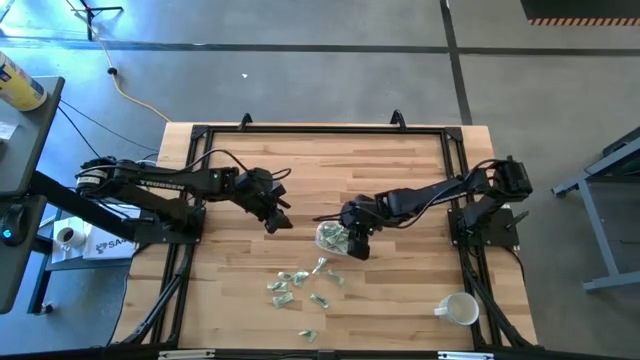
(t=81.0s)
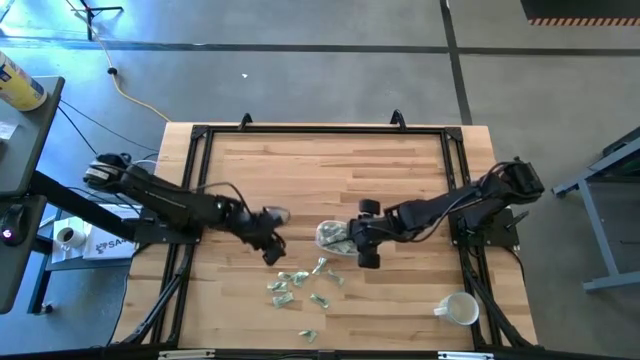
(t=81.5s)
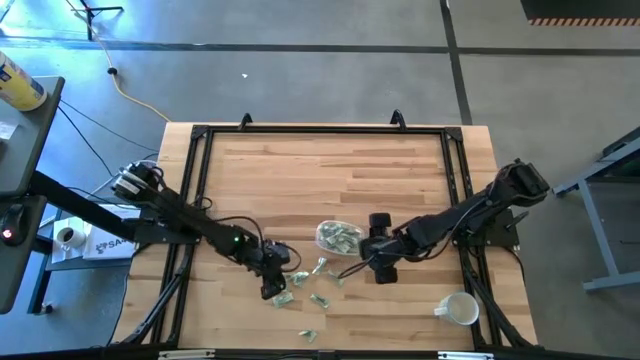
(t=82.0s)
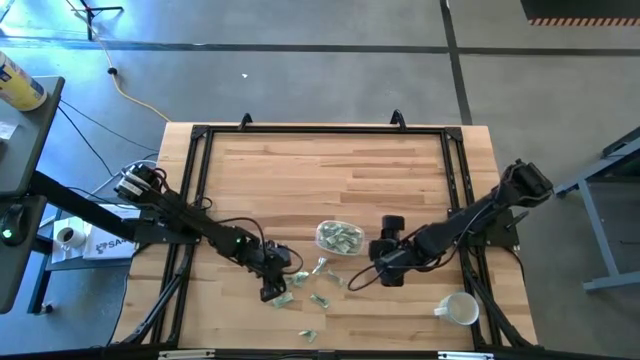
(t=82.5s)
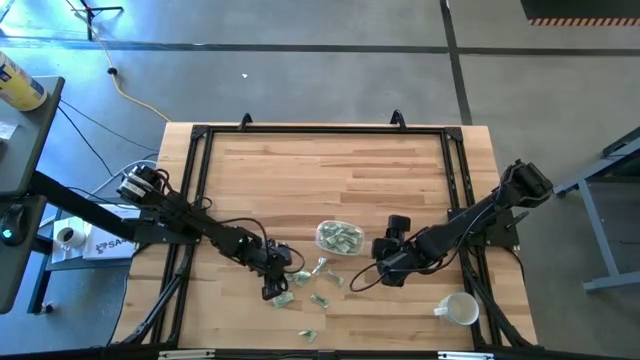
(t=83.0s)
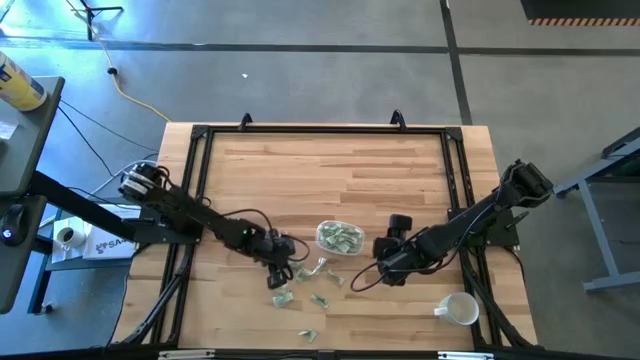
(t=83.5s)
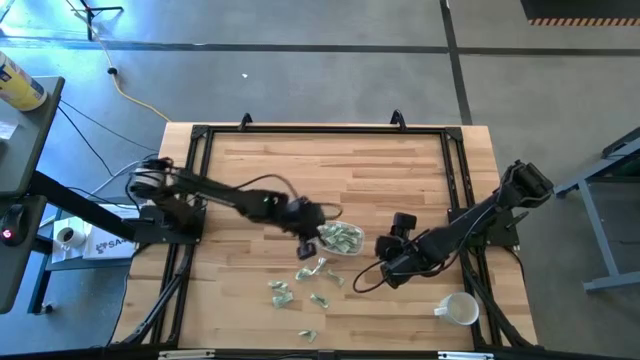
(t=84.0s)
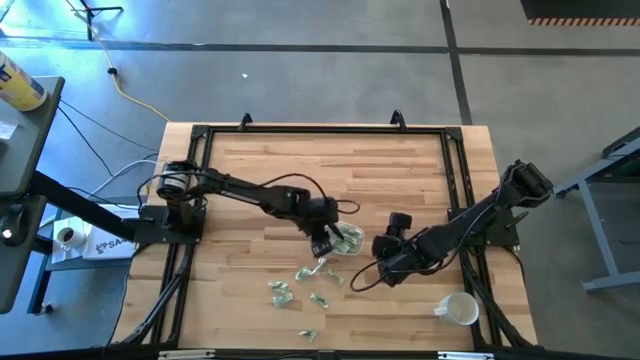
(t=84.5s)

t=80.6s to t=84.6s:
Task: Pick and place Stevia / Truvia into bins
Put the green stevia packet into the transparent container

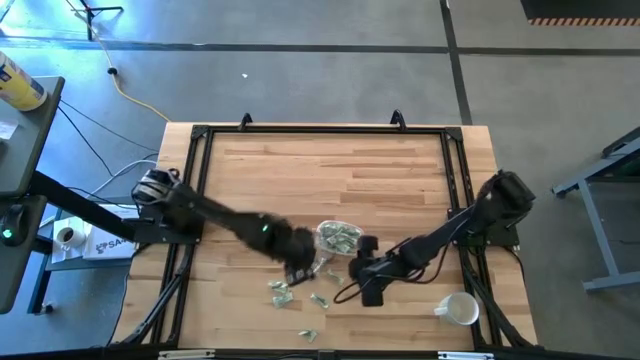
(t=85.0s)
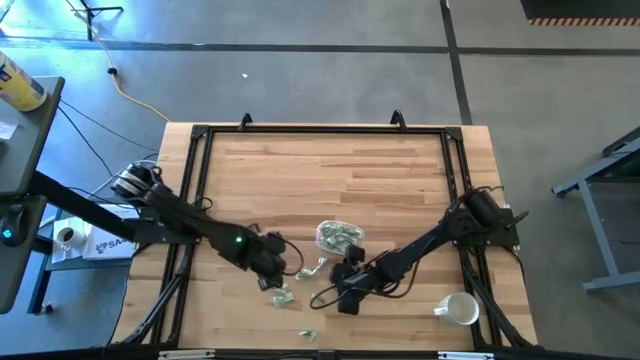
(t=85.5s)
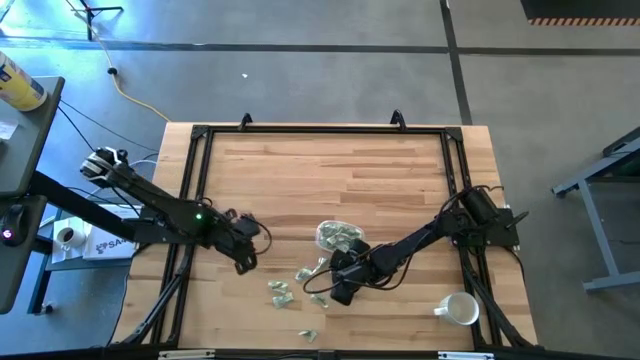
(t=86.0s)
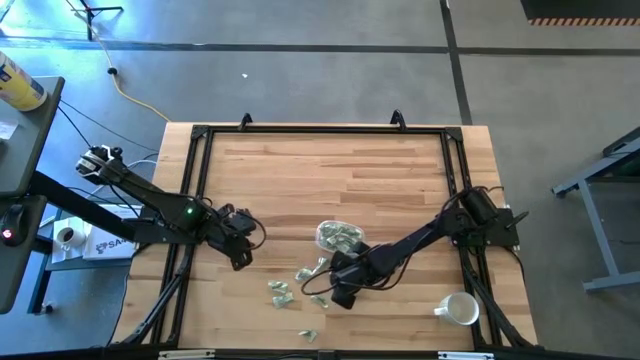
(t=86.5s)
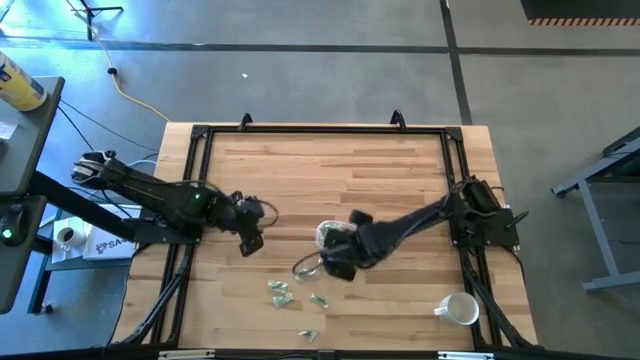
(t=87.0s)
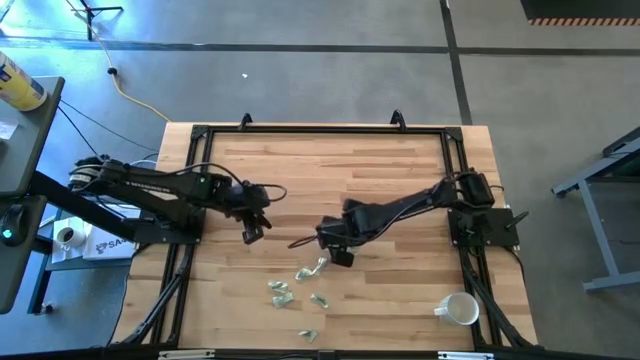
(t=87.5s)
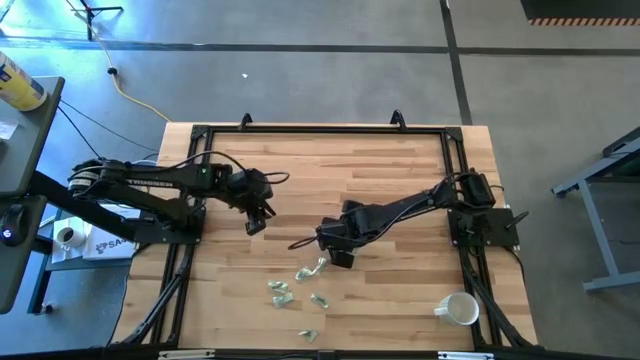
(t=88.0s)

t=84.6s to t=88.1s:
Put the green stevia packet into the transparent container

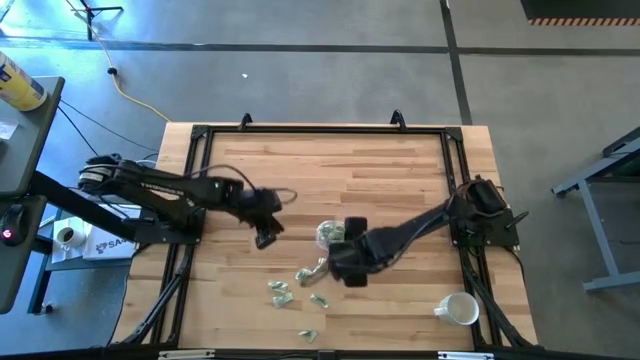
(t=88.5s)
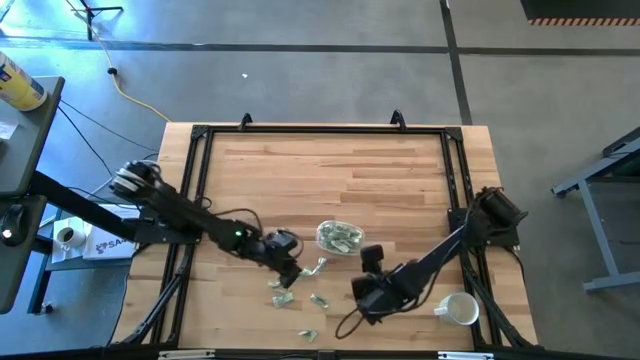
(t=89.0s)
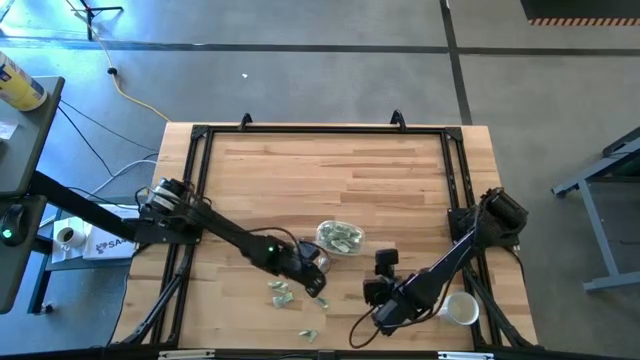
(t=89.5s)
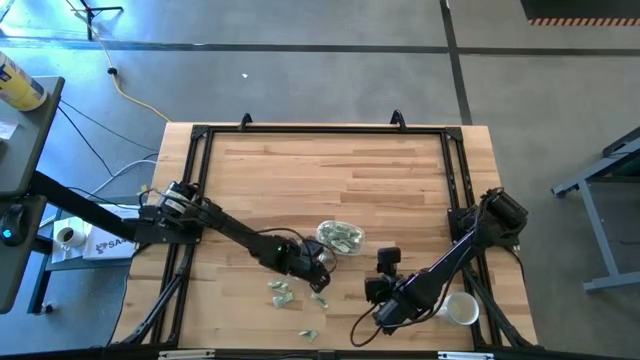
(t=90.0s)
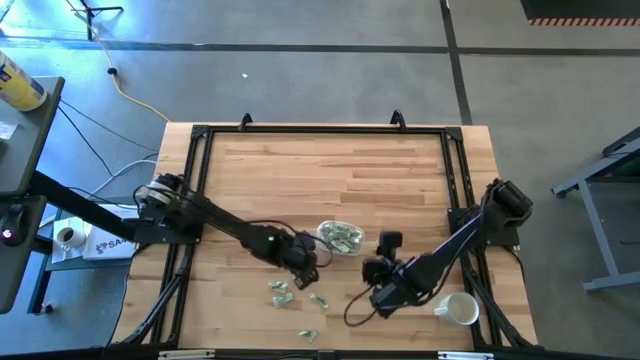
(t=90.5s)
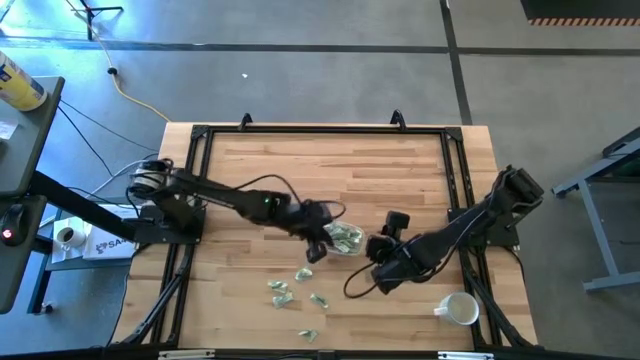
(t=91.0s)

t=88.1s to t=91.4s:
Put the green stevia packet into the transparent container

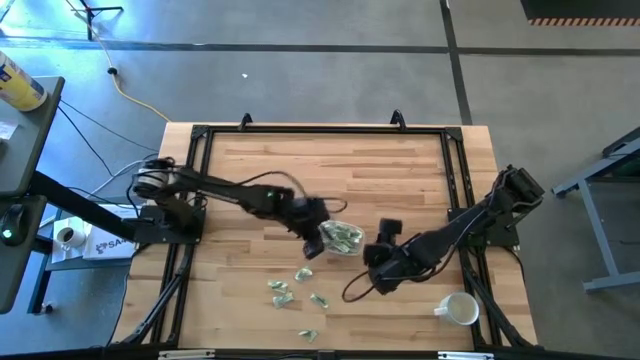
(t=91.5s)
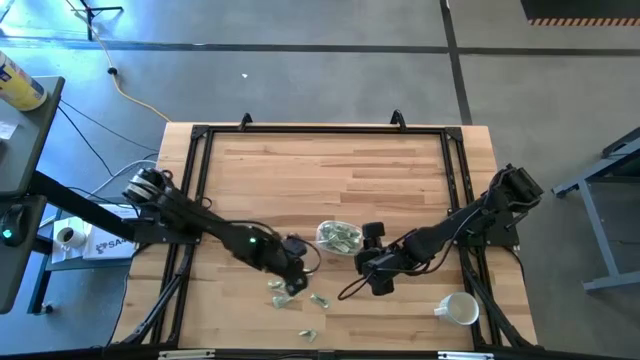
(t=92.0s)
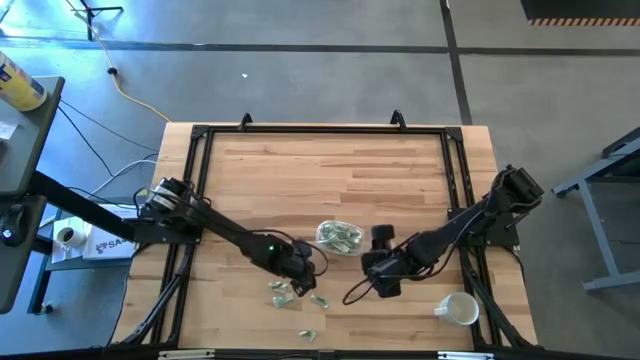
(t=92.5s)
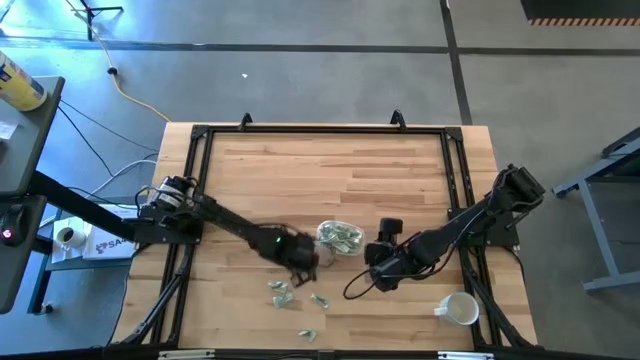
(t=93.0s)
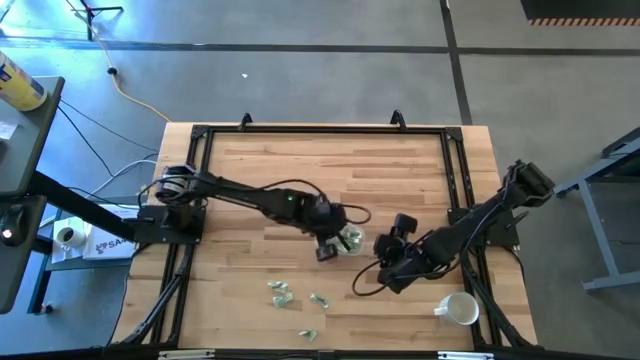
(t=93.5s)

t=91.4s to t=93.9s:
Put the green stevia packet into the transparent container

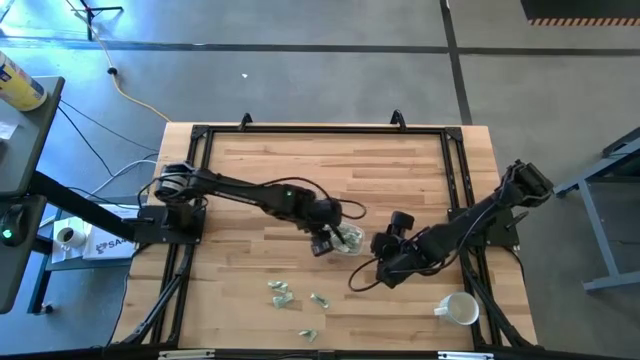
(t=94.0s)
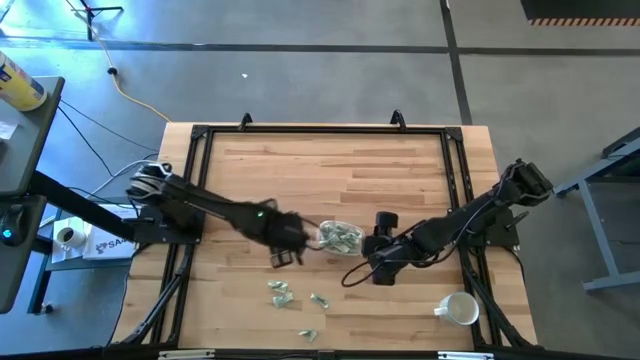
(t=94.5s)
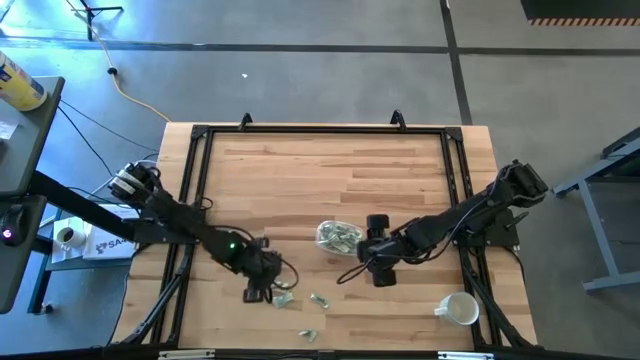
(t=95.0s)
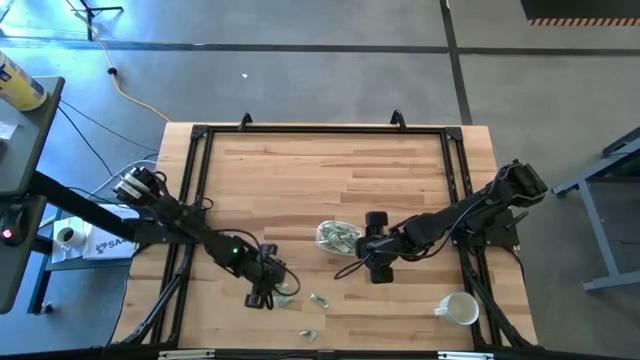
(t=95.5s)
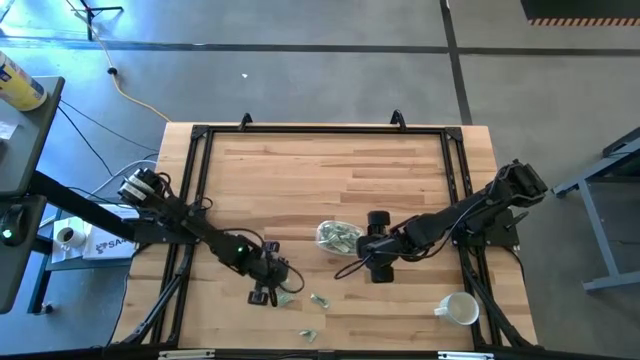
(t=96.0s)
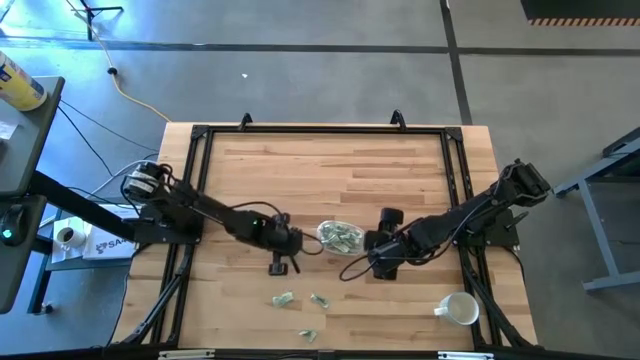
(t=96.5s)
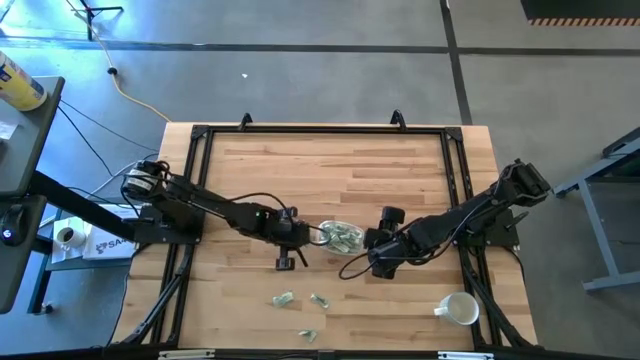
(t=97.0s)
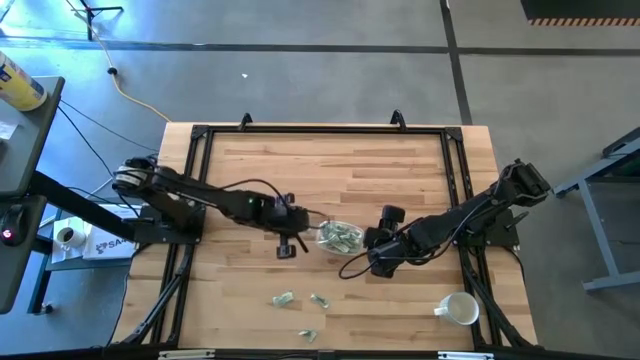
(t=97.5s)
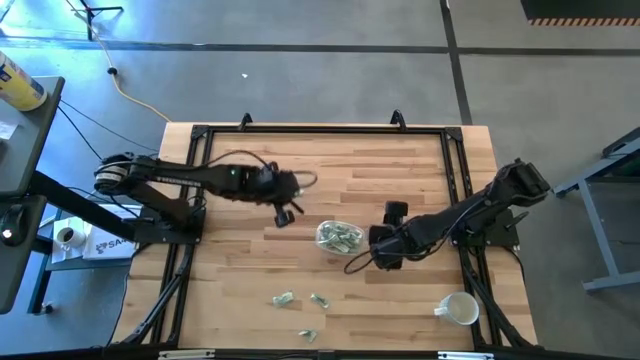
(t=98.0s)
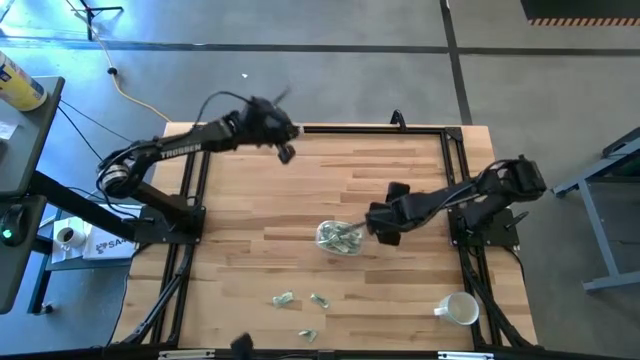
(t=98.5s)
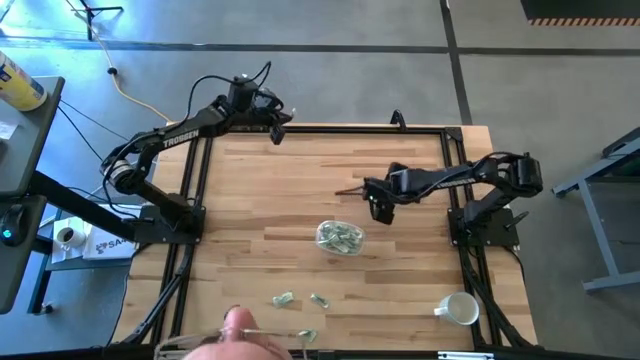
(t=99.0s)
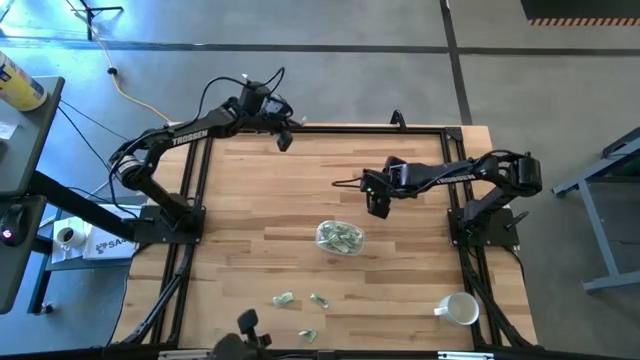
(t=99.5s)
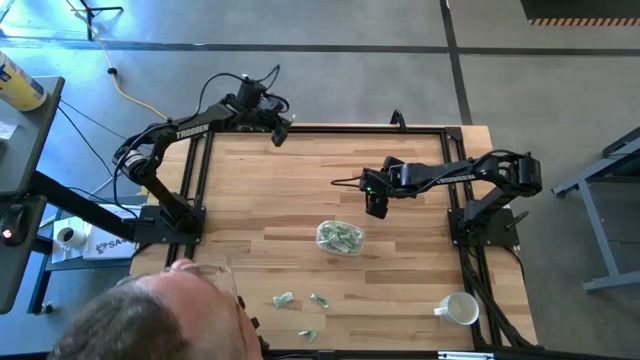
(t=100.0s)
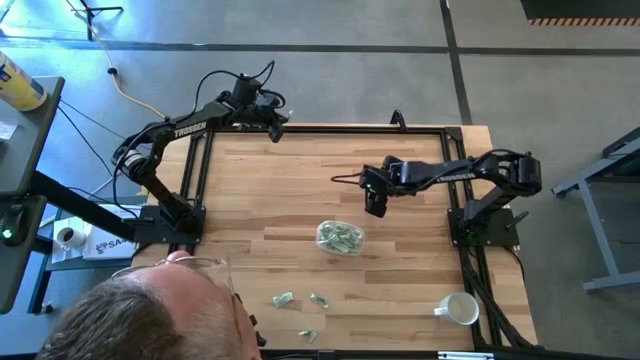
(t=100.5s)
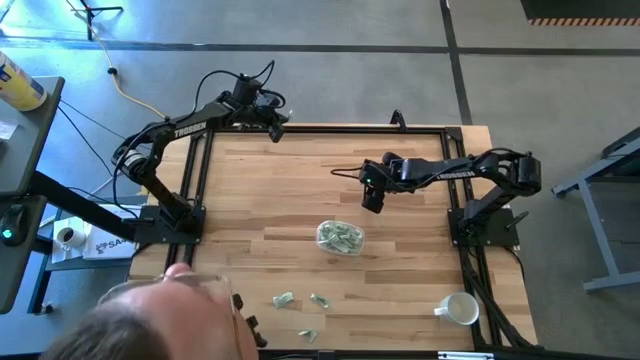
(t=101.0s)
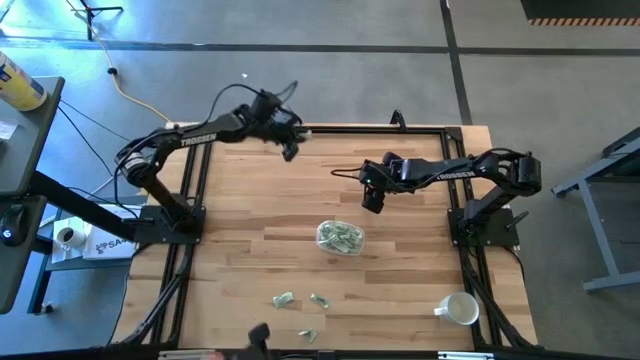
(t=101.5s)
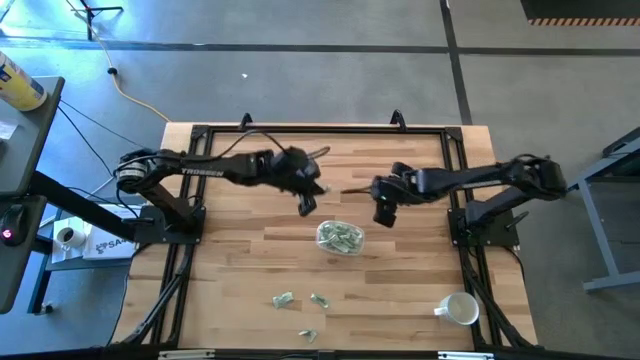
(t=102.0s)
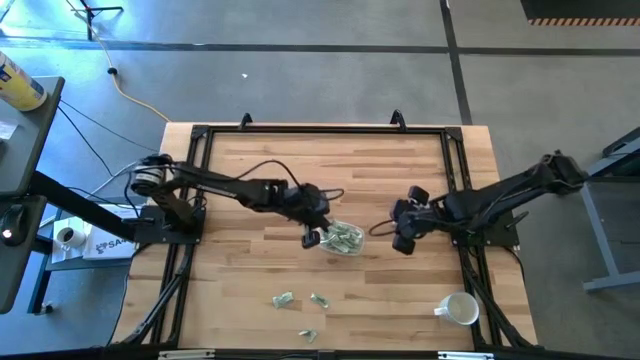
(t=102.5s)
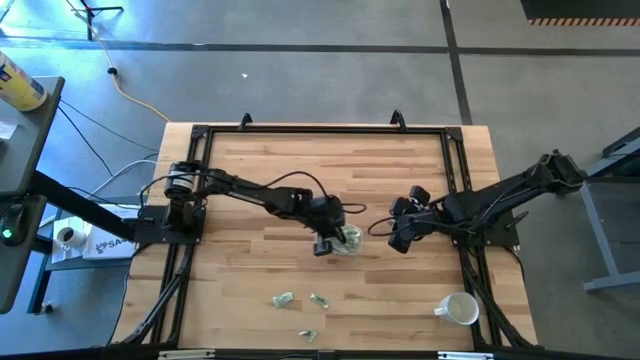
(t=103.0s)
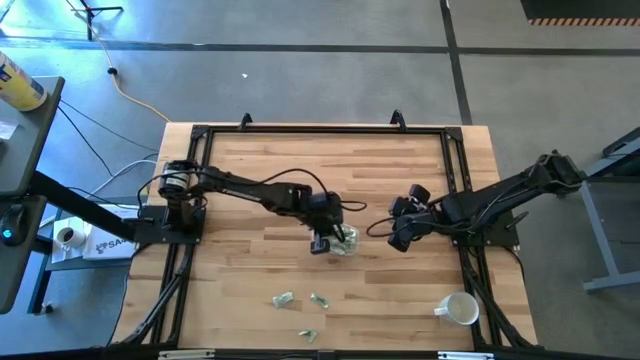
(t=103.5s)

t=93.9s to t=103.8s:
Put the green stevia packet into the transparent container
